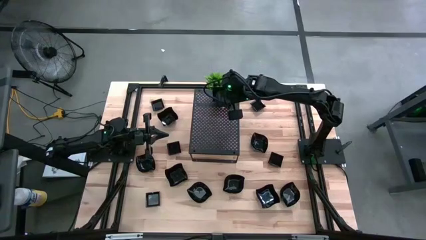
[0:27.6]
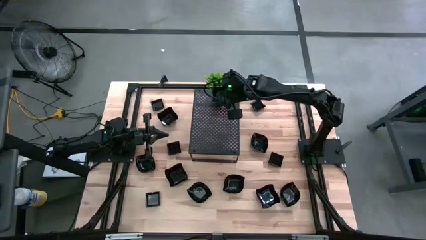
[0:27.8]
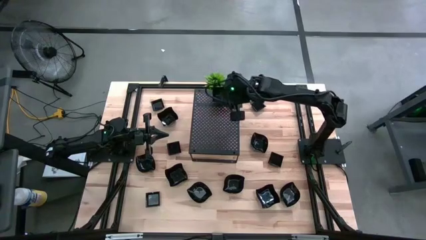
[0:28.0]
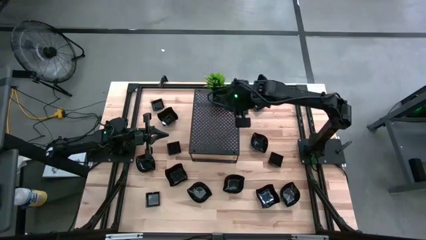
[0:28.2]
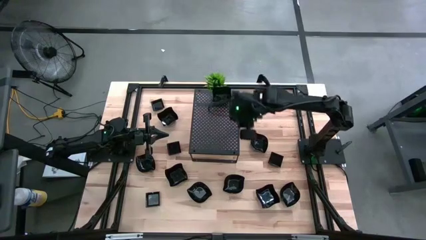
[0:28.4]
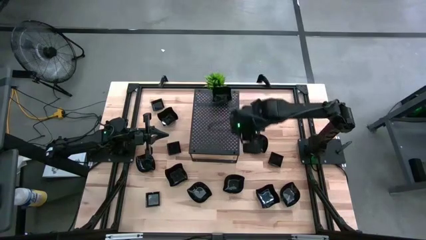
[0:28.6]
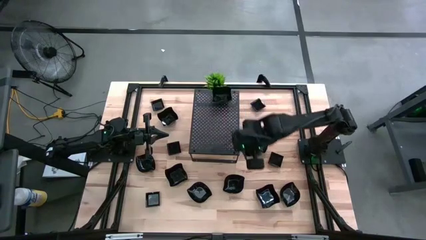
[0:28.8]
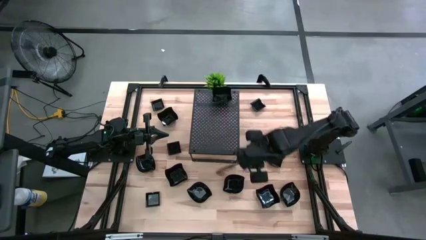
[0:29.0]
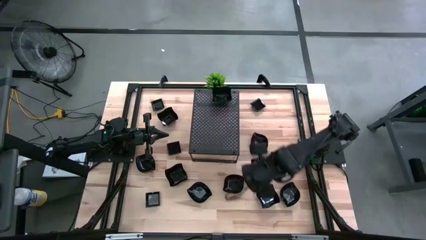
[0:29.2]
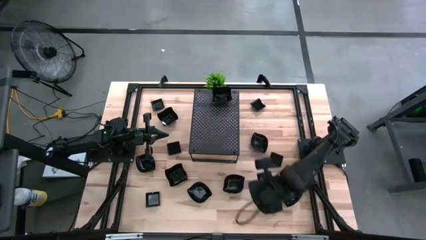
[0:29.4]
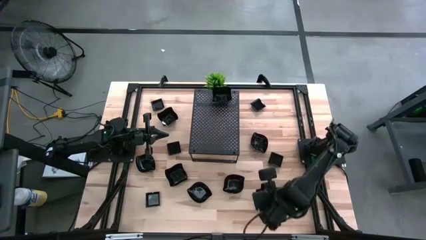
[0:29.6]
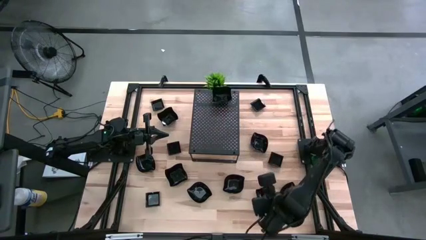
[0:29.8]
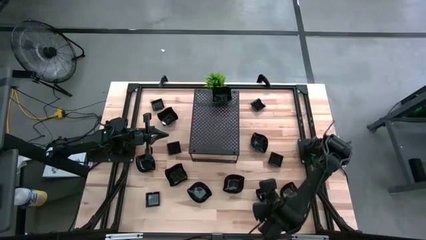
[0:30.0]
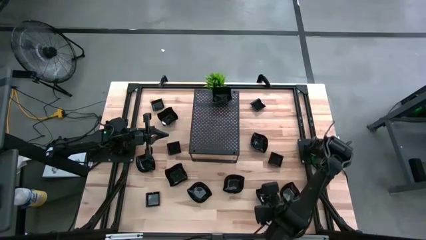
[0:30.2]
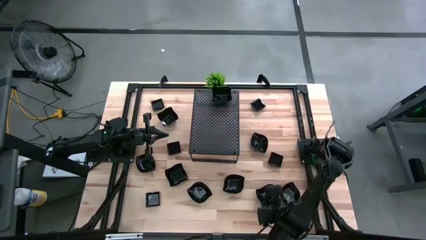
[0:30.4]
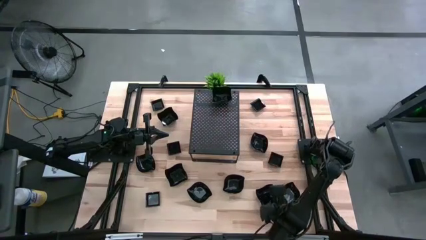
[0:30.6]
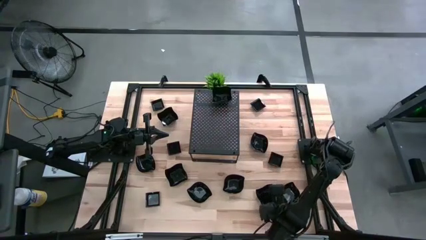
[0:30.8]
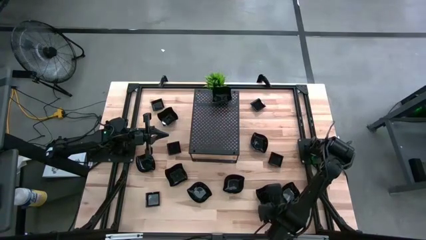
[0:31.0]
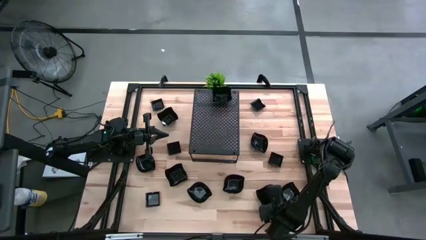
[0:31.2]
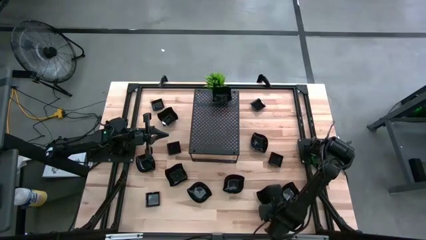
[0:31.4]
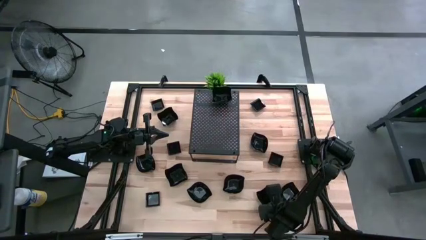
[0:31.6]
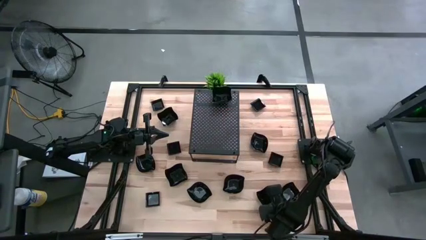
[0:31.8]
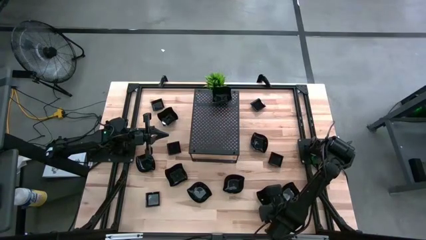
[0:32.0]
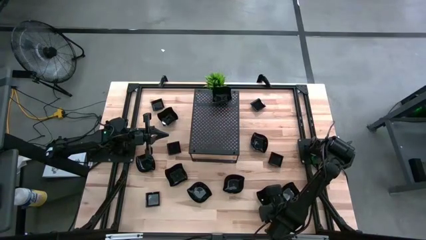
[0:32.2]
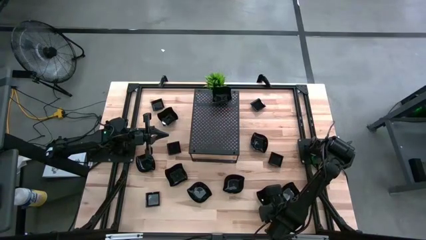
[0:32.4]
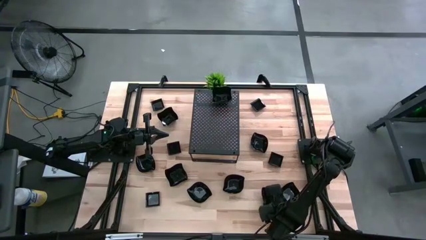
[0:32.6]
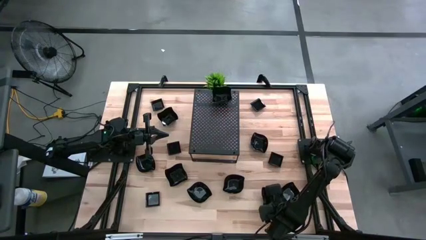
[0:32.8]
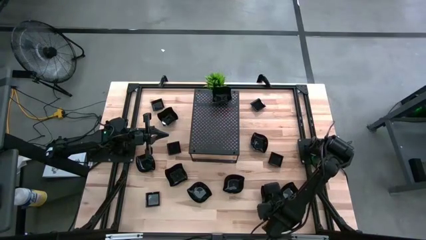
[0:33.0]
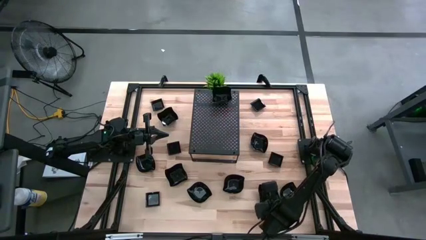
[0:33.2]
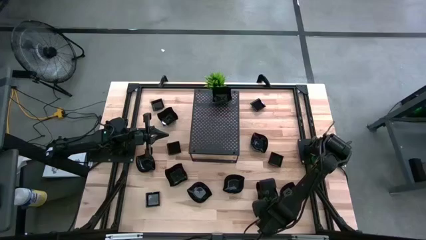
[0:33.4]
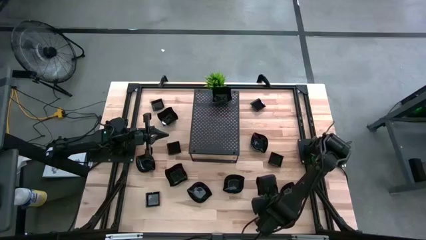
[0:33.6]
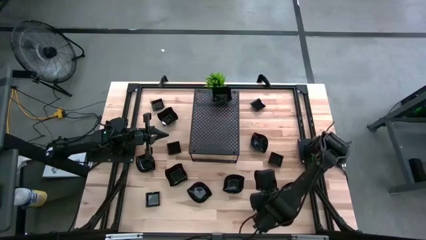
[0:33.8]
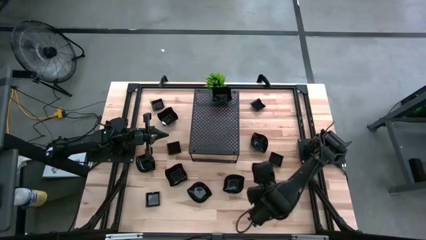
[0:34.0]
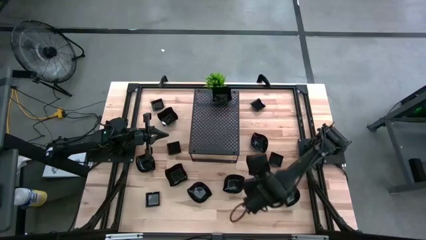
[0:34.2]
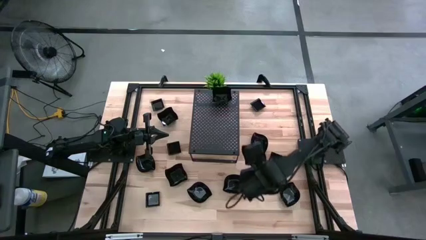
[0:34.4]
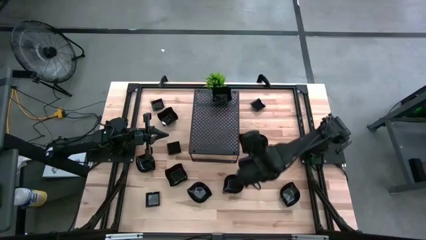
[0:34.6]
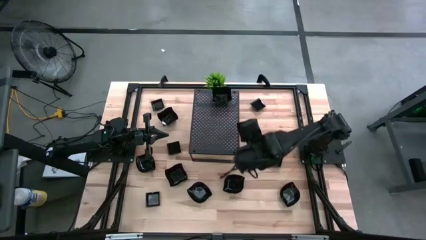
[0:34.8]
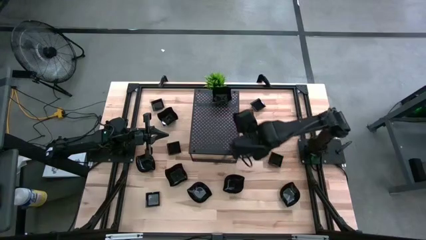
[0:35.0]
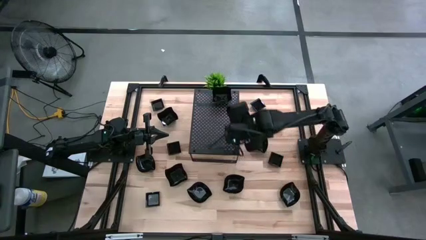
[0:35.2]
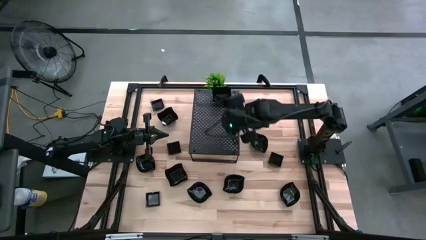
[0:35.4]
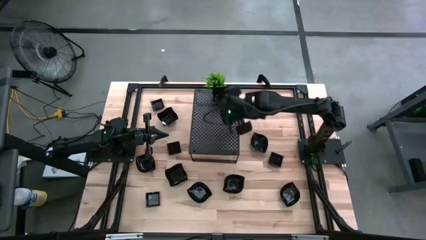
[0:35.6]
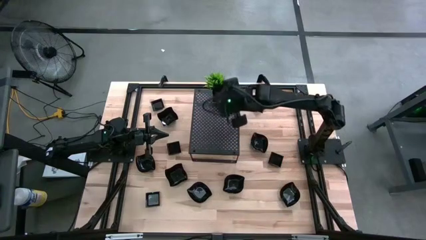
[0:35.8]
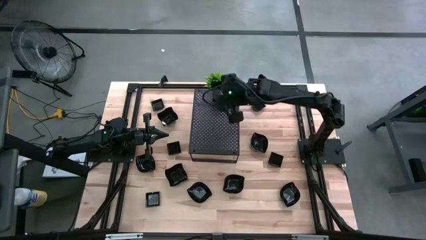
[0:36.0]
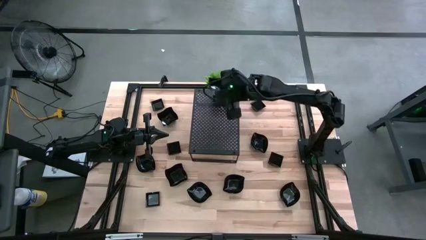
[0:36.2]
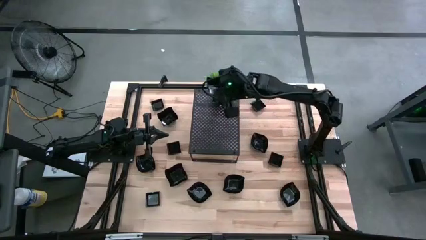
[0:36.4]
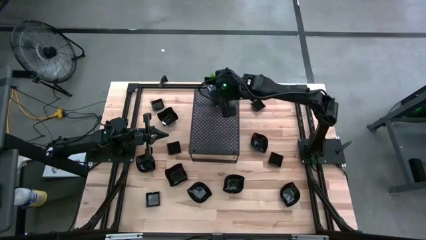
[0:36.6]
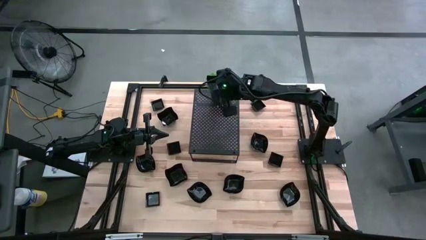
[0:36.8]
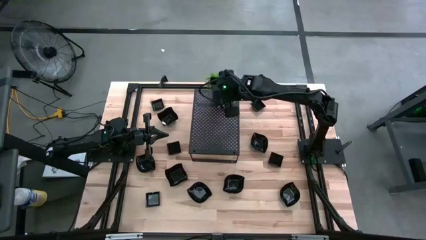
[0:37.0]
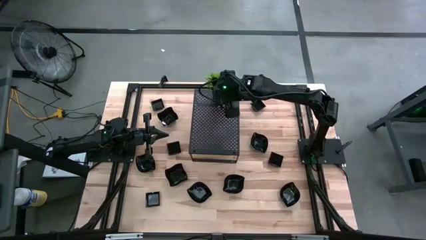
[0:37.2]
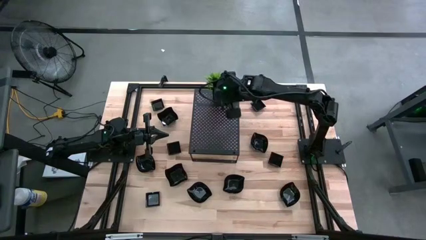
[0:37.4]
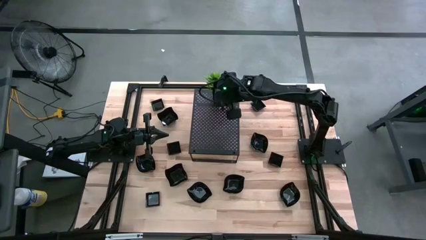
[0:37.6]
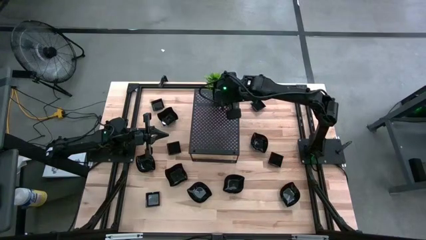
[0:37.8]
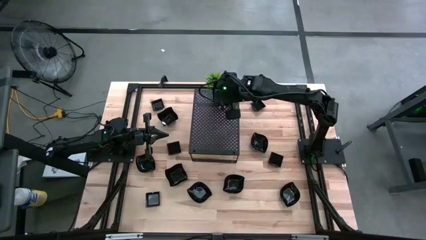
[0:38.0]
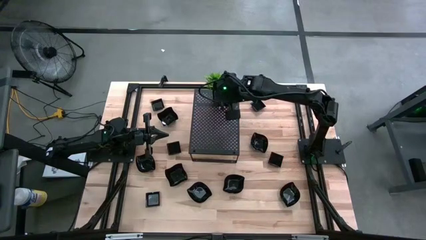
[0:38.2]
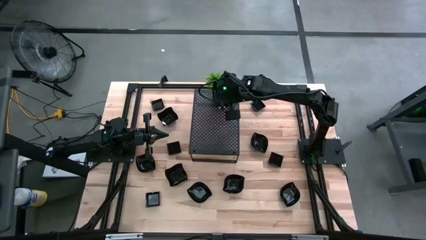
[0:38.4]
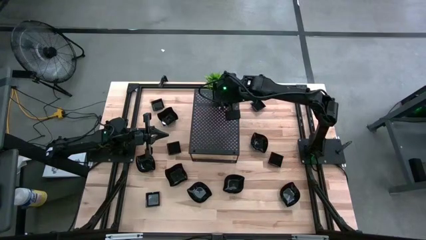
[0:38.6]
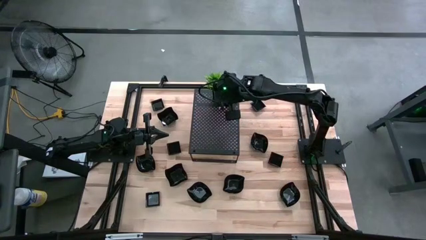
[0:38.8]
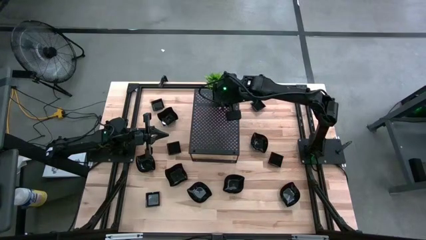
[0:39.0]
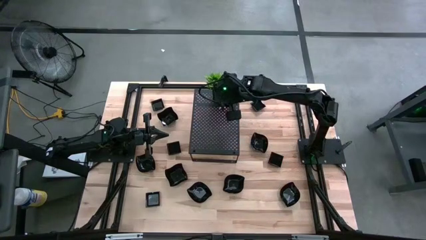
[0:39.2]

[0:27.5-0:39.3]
Task: Pick & Place Mini shaped plates
Stack the distorted square plate on top of the distorted square plate on the shelf

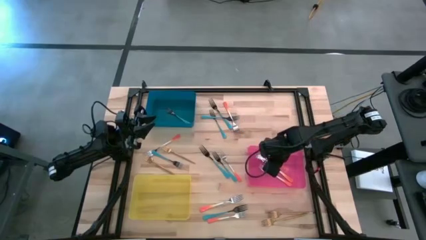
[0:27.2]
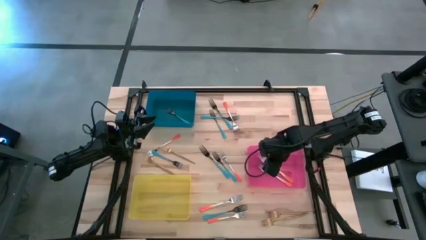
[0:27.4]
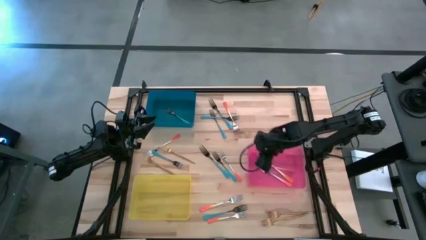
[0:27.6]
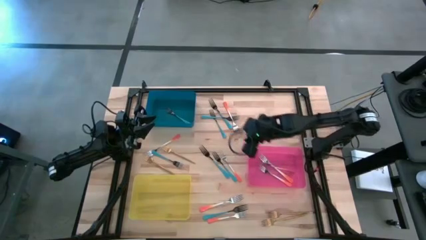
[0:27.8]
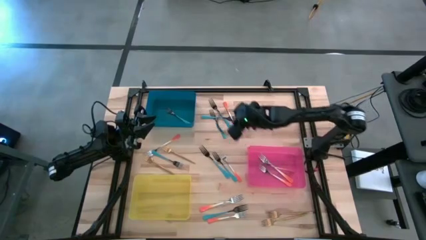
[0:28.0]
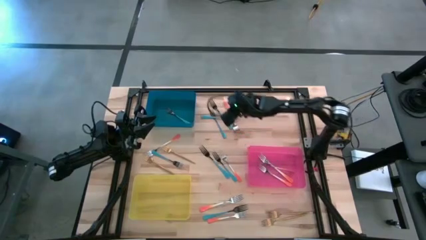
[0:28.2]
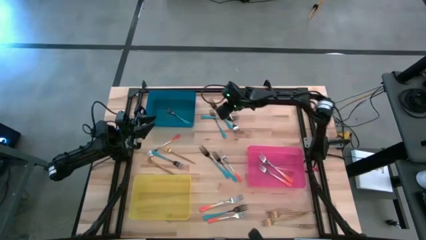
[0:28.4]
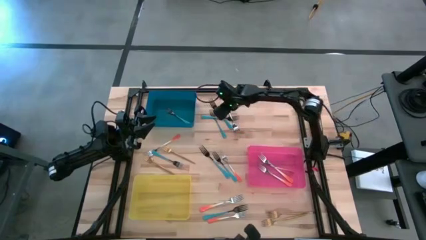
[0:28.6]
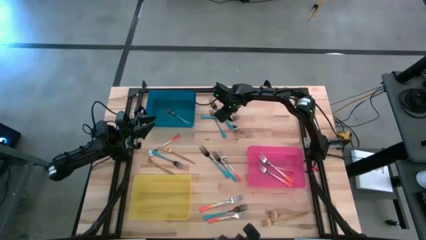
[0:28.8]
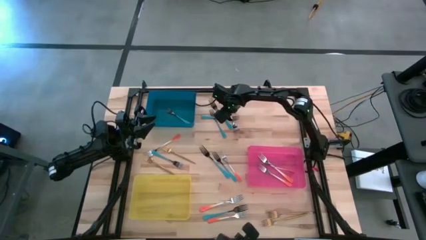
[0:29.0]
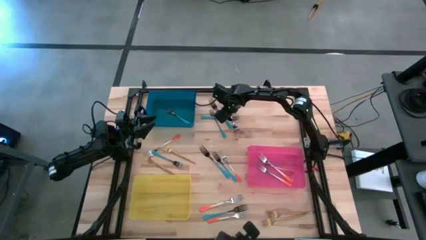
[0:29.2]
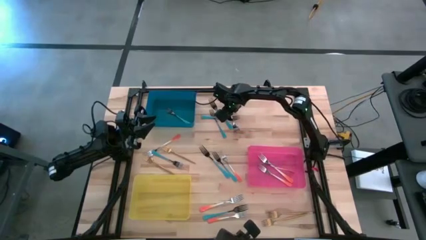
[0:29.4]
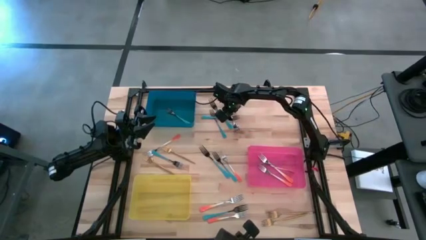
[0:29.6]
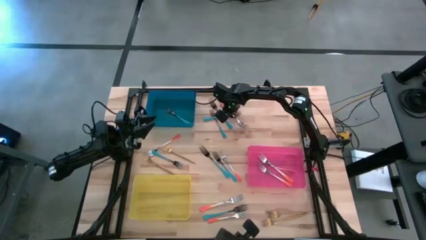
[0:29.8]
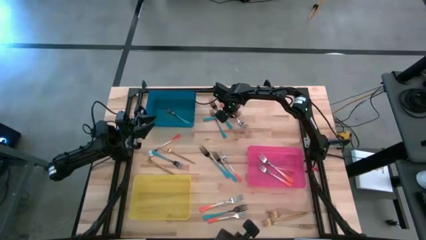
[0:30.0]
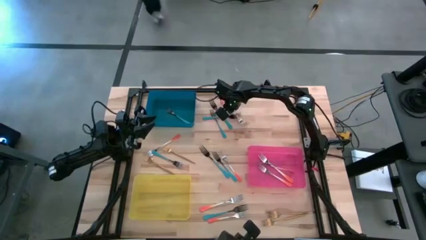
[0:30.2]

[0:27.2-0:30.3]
Task: Sort silverware by color (type)
Put the orange fork into the red bin

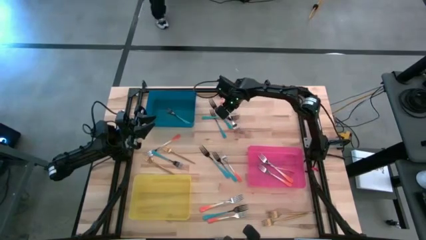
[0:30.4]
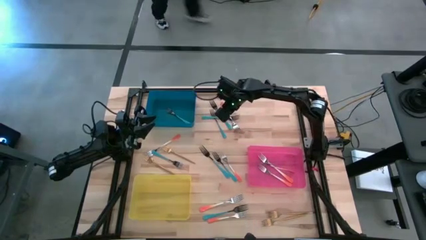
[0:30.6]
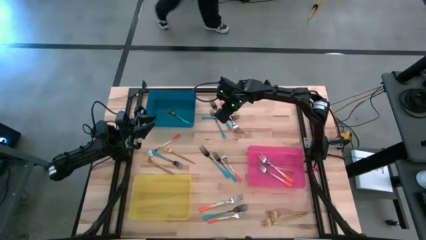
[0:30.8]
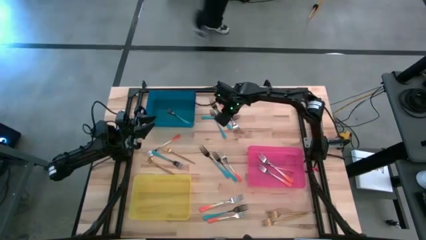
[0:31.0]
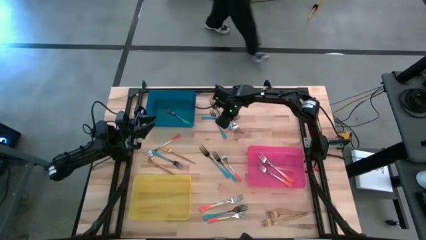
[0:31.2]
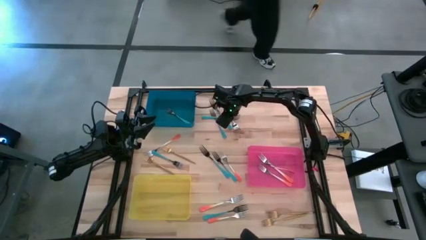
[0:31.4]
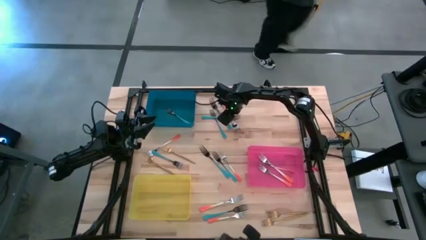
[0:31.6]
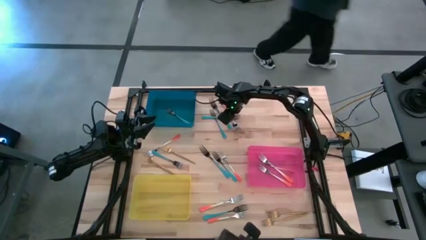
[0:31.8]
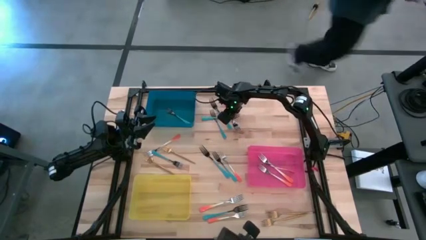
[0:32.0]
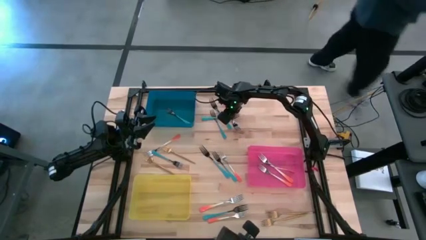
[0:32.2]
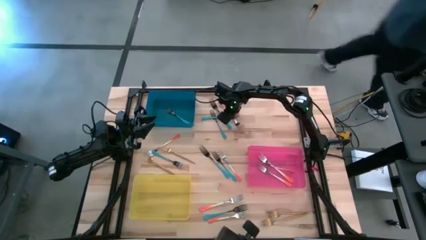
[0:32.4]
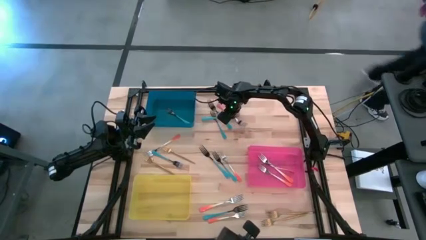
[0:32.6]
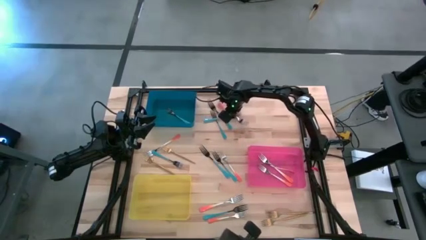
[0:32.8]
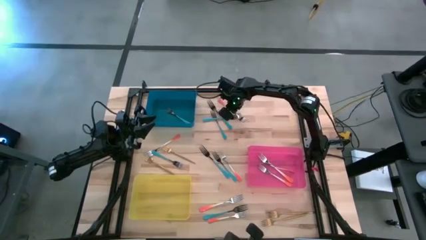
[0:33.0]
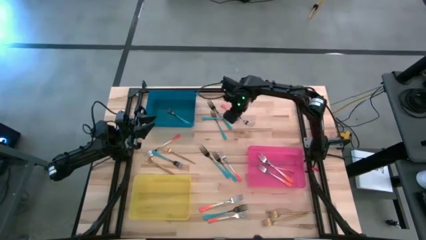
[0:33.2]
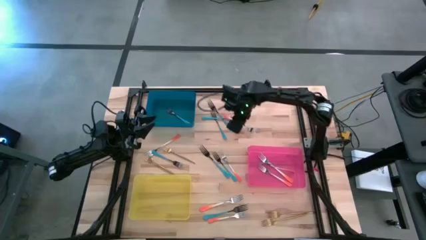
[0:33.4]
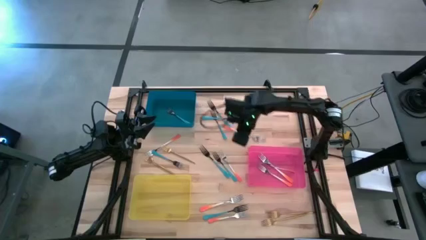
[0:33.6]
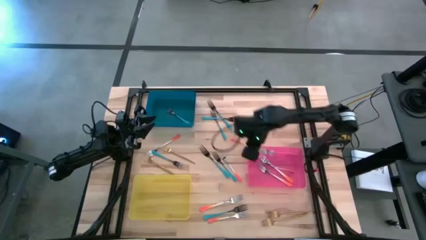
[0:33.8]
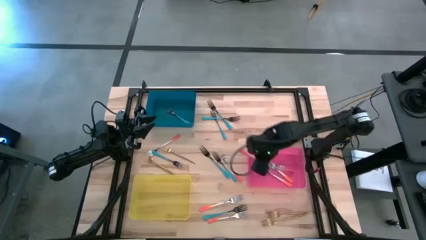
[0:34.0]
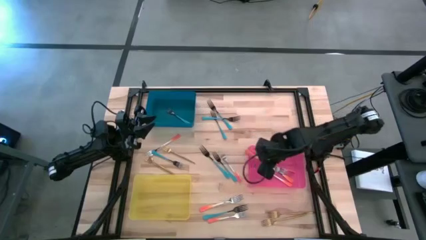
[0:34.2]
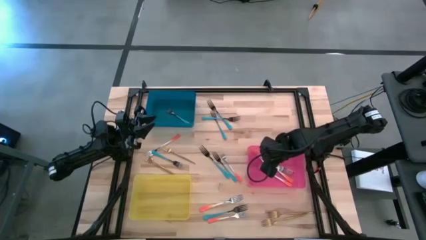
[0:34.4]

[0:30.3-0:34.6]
Put the orange fork into the red bin
